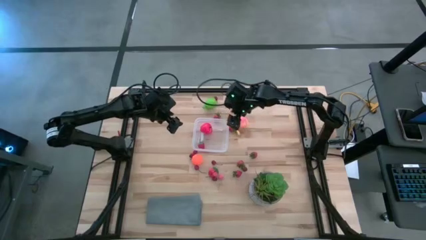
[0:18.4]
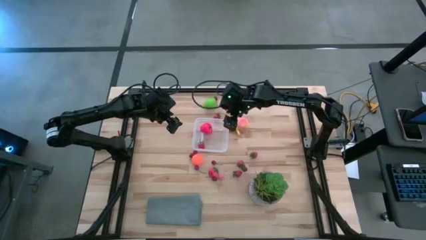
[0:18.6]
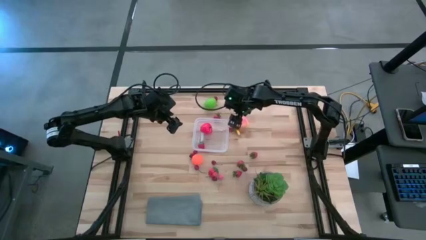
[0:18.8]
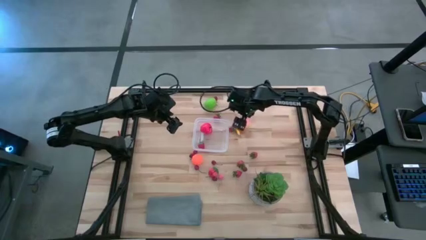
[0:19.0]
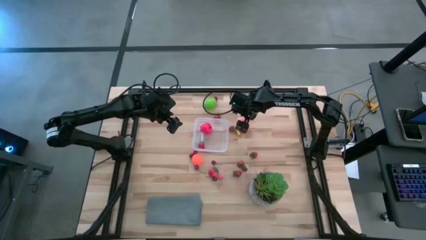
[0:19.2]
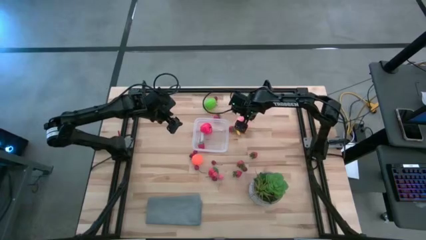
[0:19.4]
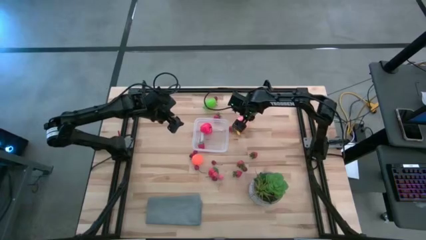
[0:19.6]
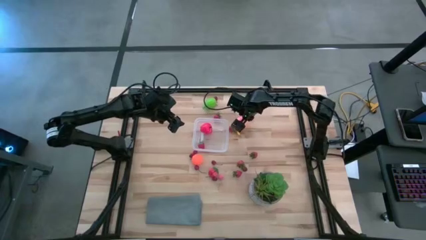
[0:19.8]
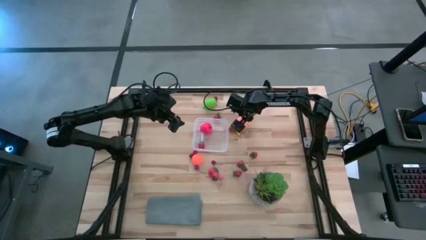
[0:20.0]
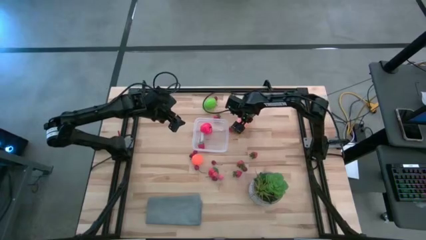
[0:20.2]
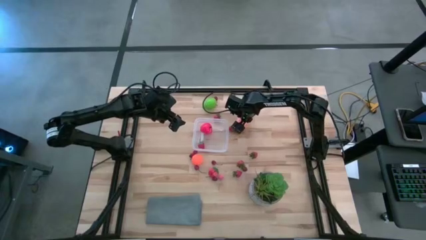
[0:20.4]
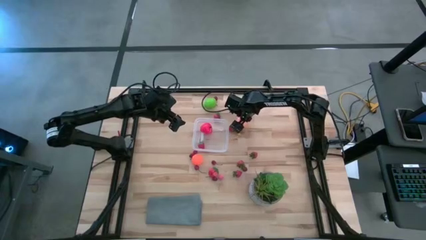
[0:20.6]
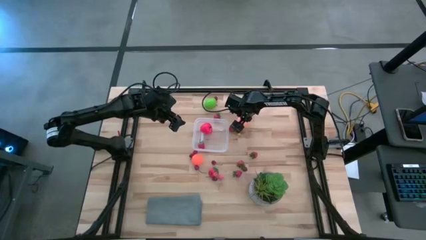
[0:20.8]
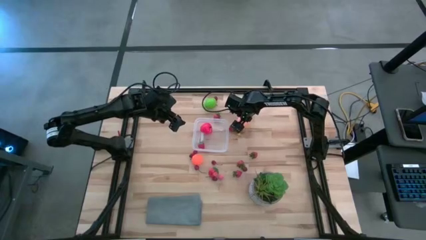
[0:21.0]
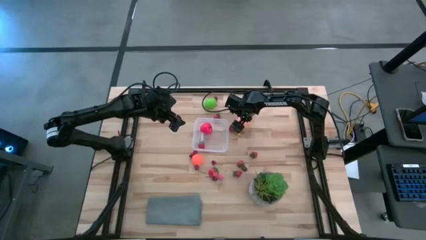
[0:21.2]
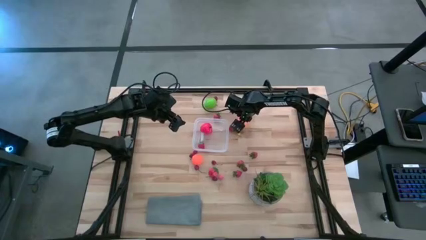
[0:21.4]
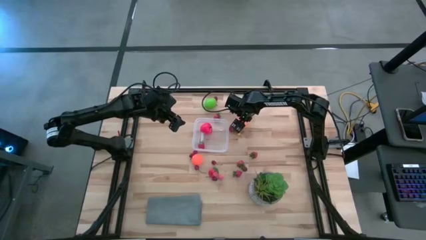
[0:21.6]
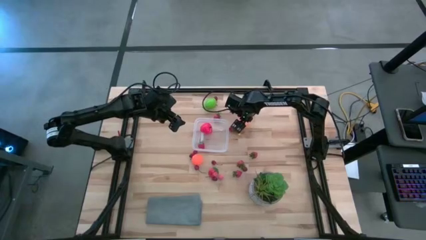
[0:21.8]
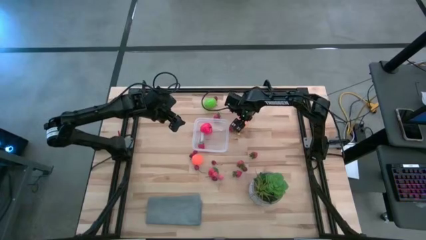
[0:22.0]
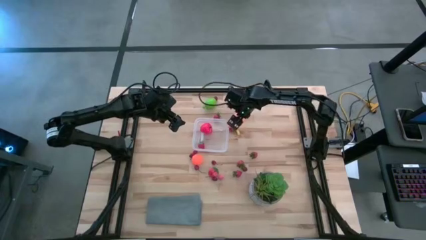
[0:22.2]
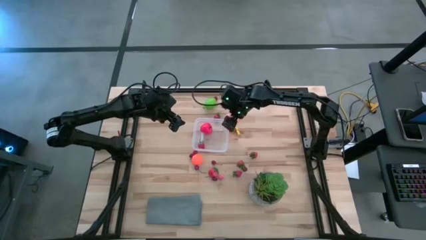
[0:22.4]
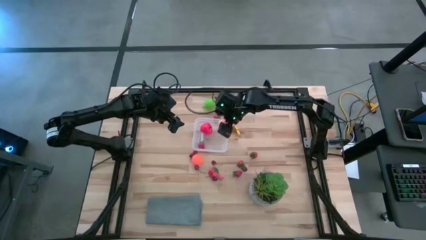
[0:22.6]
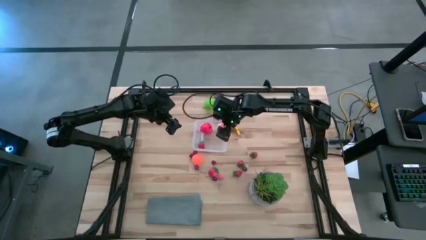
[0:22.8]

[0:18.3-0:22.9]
Task: Pick and placing Produce into tupperware
Put the pink peach into the transparent bin

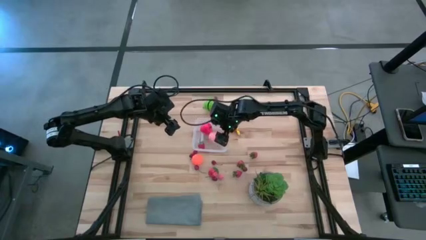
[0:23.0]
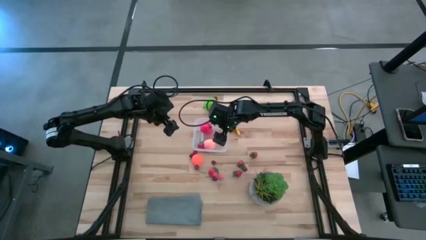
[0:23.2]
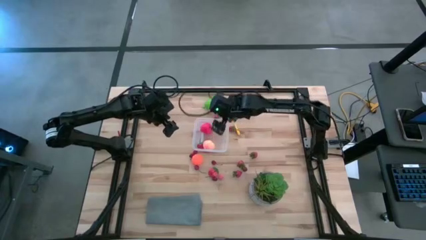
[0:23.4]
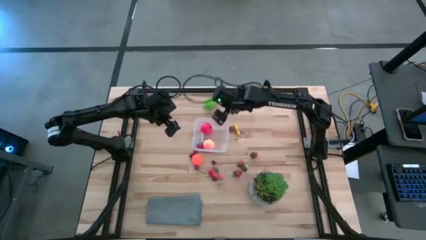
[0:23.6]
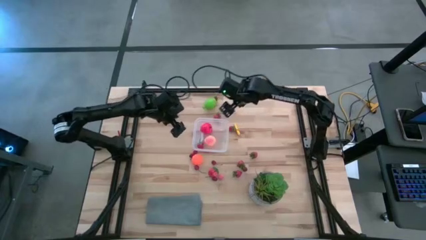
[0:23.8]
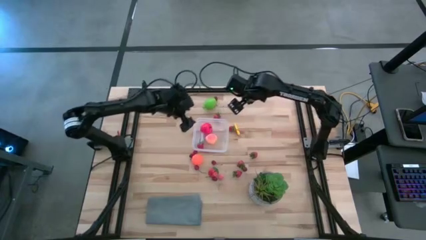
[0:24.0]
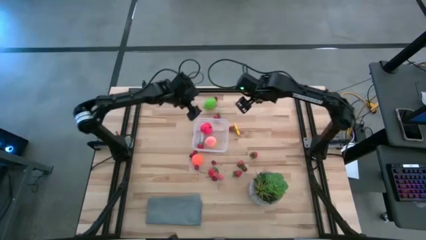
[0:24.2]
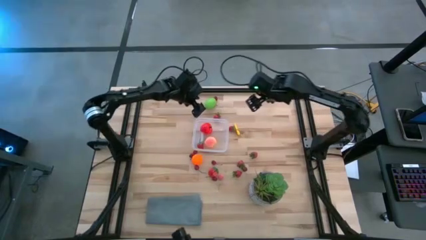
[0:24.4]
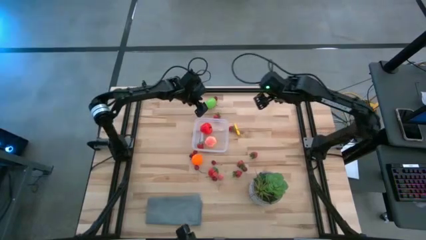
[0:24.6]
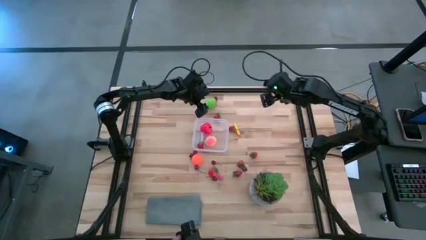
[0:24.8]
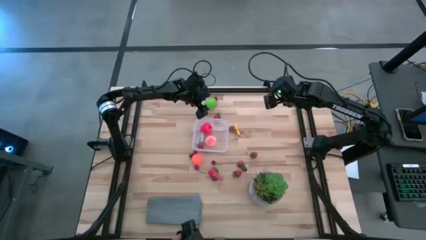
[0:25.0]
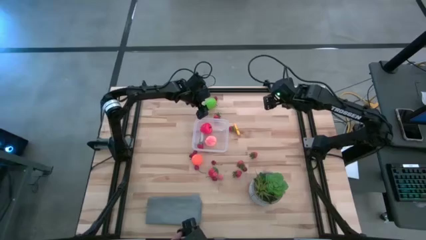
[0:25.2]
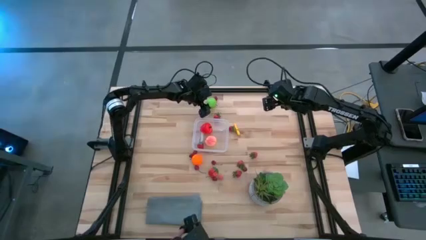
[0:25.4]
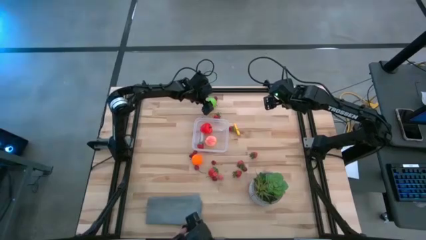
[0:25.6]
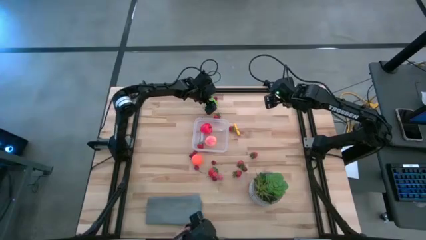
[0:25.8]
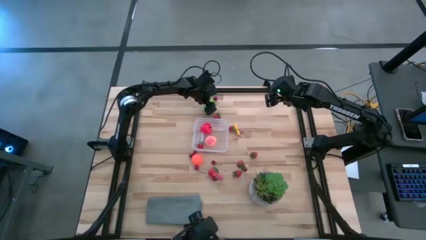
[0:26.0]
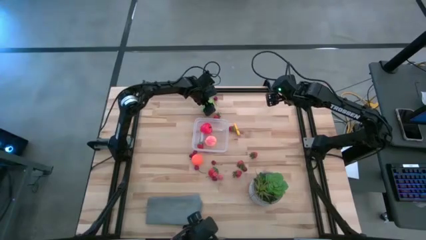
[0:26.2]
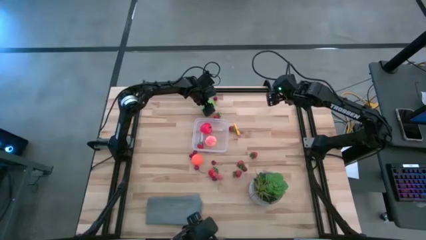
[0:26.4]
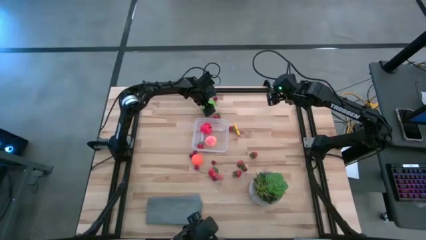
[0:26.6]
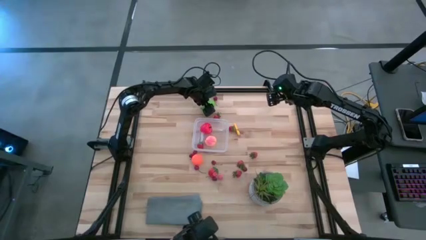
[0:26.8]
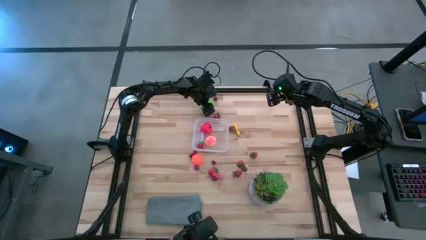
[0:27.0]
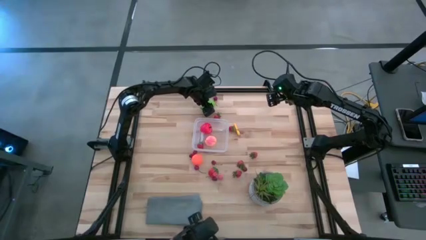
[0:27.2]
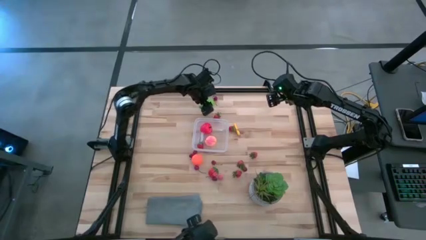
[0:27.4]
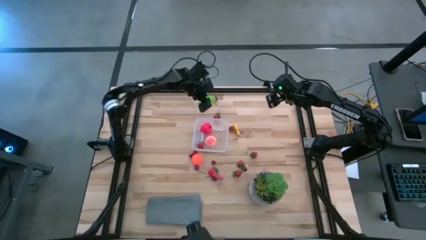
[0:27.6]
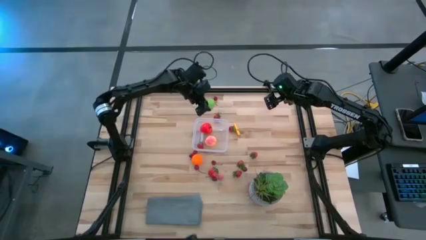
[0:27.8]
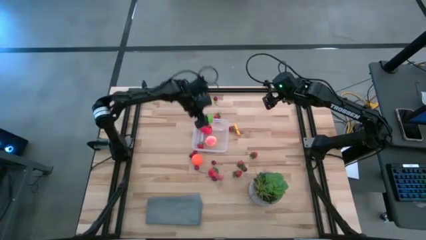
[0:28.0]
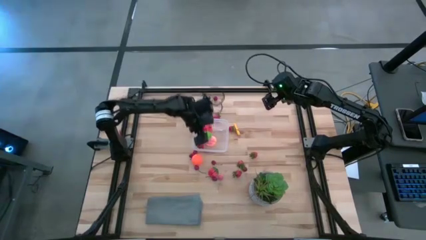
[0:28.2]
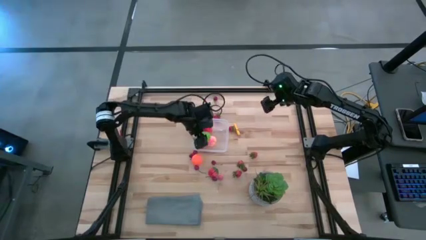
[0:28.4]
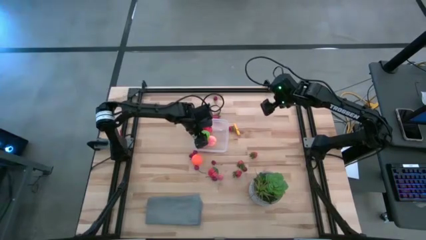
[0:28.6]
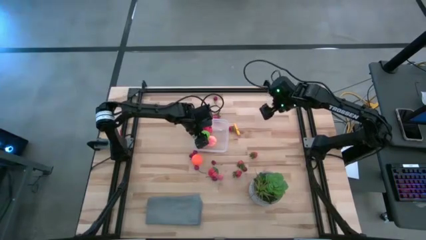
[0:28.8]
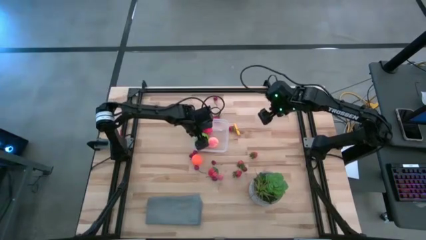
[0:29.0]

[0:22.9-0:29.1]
Put the green melon into the transparent bin

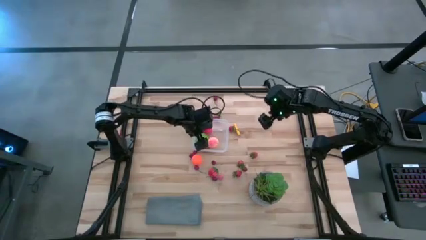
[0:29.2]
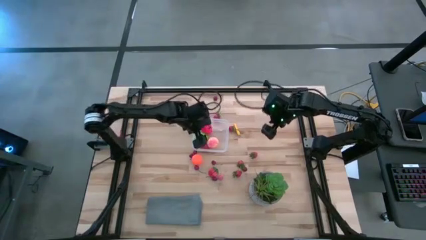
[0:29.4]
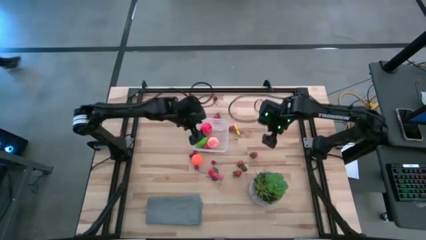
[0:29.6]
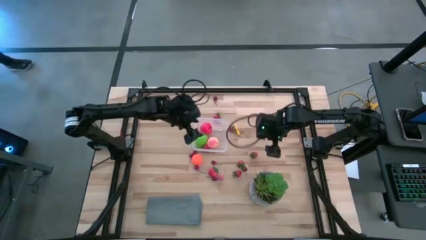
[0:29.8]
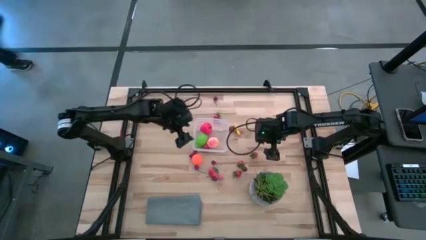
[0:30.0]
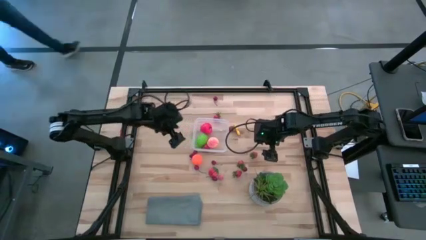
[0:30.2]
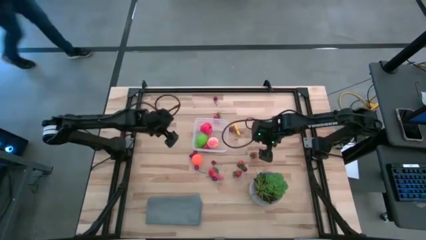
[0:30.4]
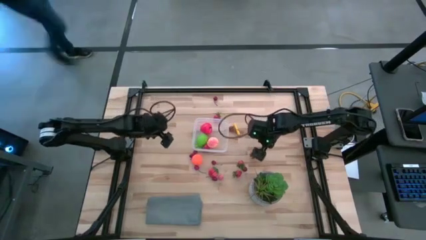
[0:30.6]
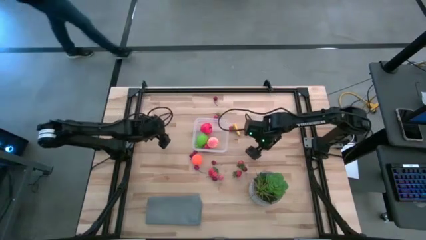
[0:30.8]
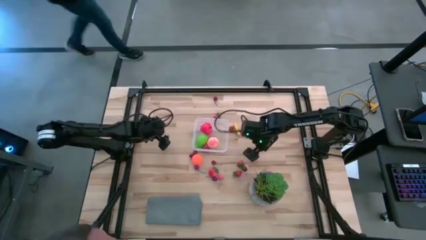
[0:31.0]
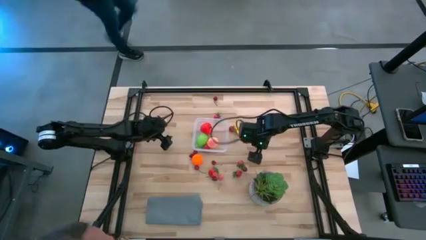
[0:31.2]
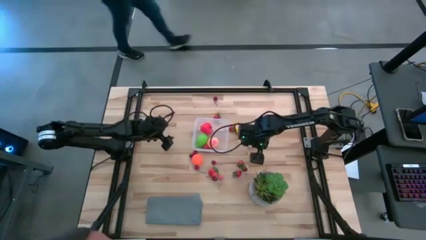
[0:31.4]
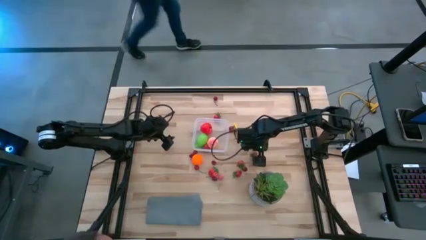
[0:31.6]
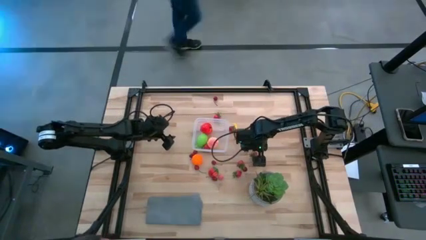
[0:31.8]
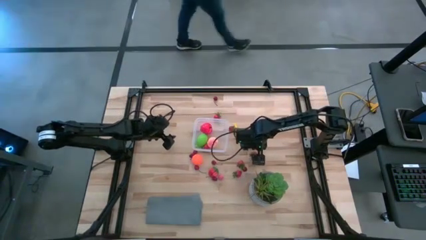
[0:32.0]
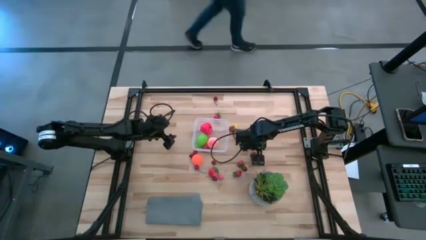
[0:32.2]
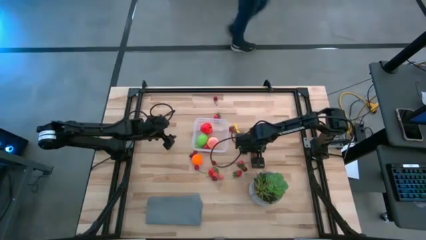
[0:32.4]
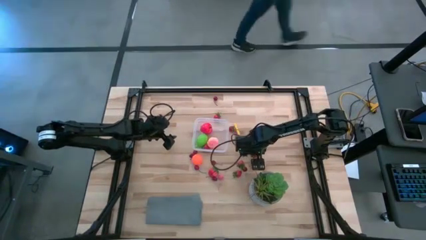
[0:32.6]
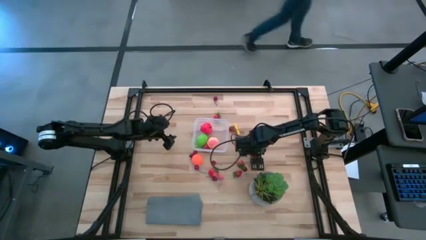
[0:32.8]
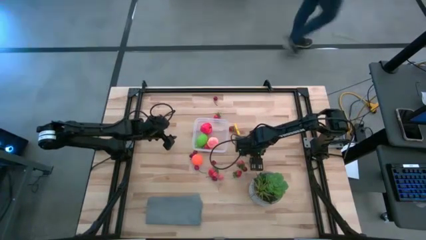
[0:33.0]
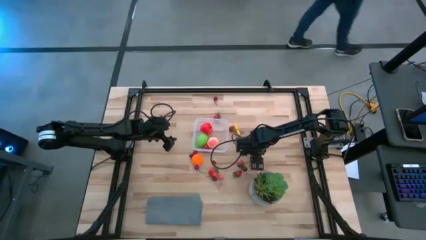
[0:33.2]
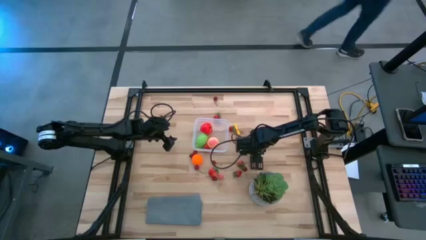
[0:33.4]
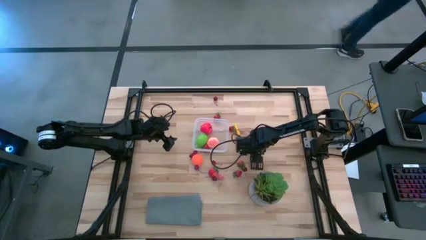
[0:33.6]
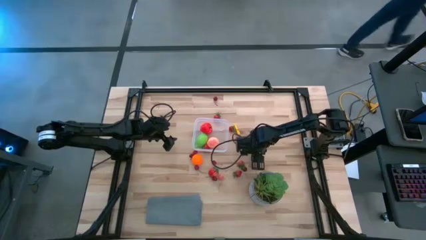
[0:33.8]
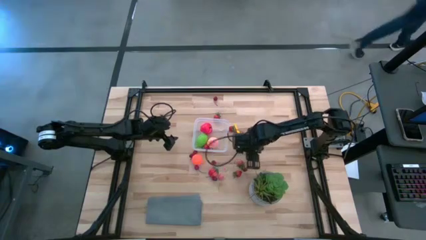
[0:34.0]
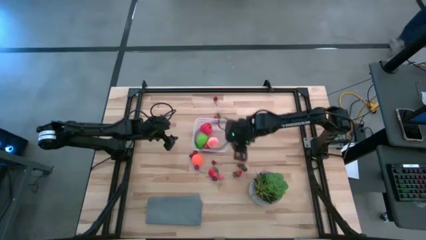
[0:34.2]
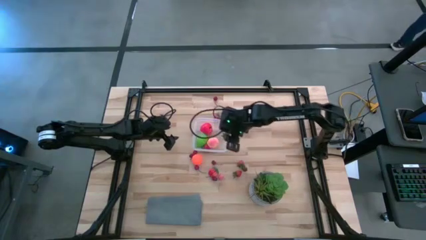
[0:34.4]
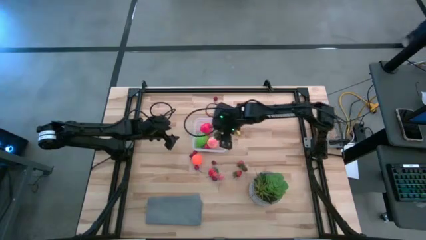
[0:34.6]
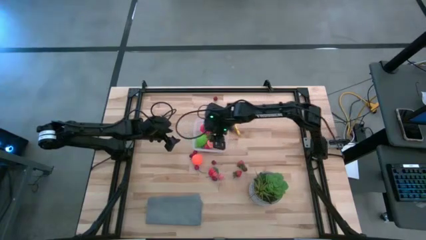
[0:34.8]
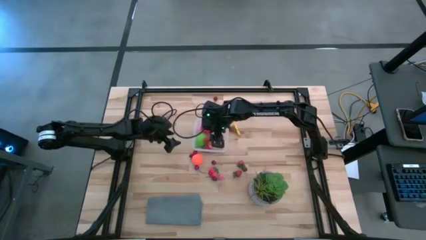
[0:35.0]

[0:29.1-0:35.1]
Put the red strawberry into the transparent bin
